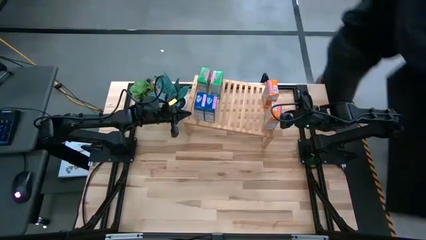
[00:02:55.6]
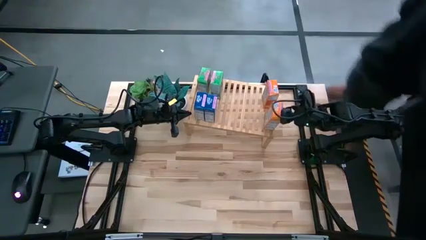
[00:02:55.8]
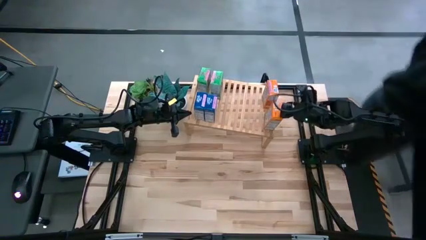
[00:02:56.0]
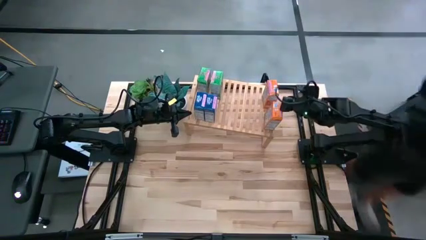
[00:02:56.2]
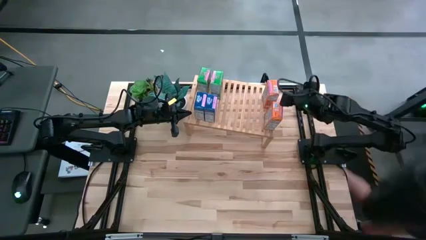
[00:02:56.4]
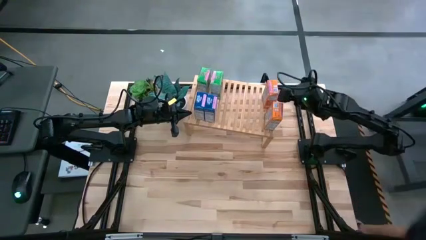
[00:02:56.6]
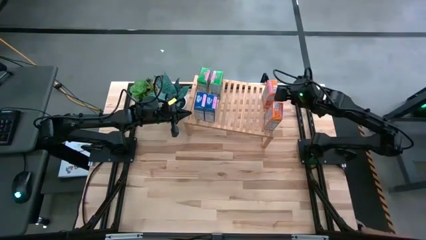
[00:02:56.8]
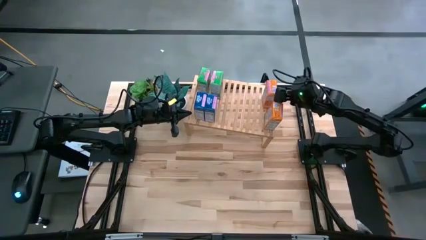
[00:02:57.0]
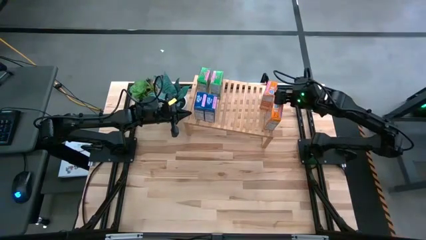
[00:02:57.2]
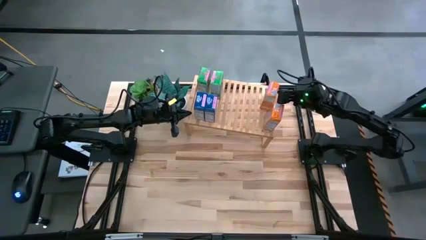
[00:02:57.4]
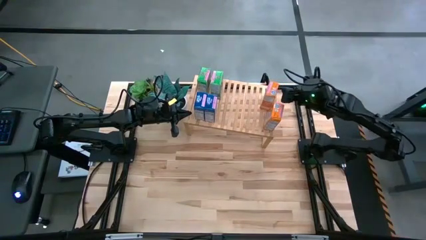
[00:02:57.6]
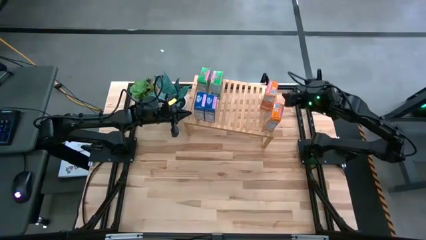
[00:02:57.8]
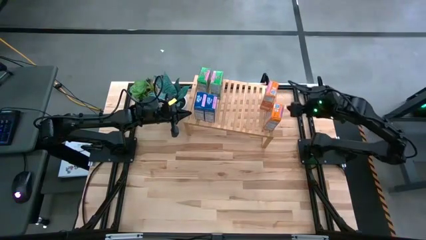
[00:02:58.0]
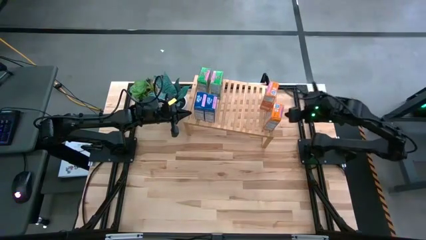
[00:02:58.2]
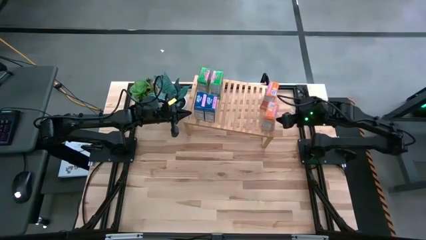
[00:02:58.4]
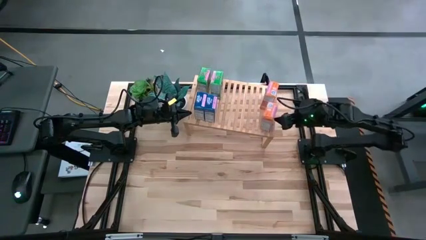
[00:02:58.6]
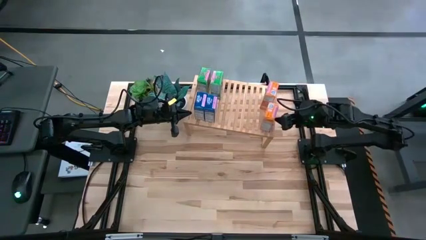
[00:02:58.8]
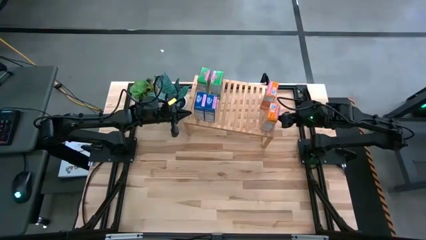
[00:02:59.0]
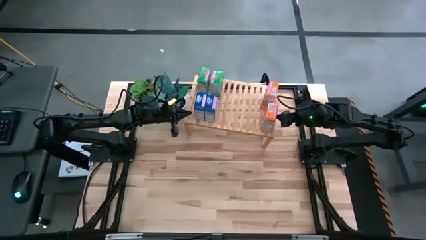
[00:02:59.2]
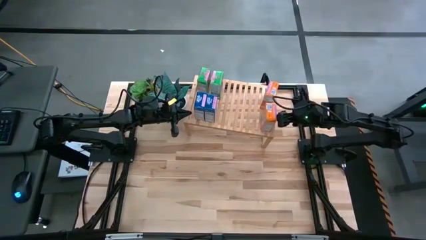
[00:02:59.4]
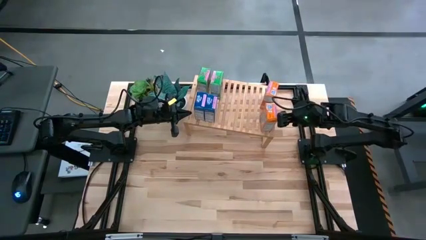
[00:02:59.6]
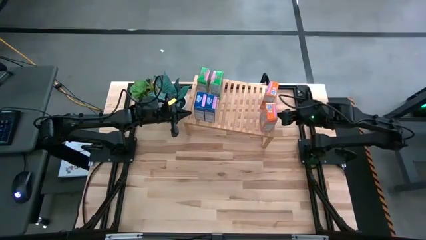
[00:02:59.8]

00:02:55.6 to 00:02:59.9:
Task: Stack cereal on shelf
Adjust the orange cereals on the shelf

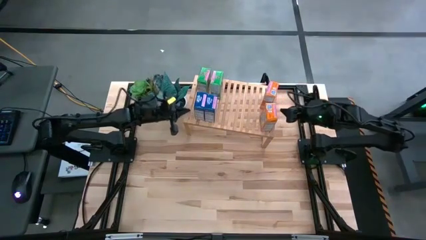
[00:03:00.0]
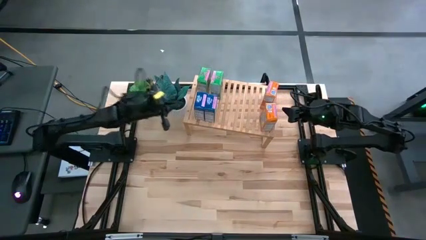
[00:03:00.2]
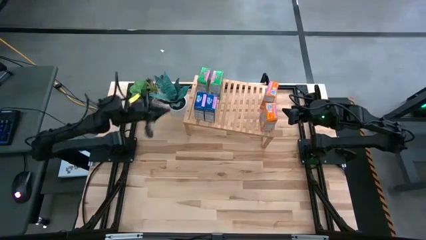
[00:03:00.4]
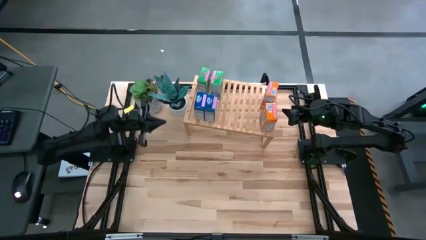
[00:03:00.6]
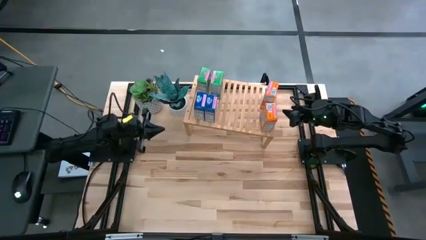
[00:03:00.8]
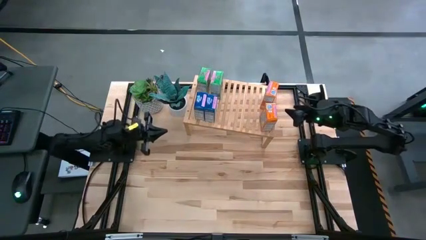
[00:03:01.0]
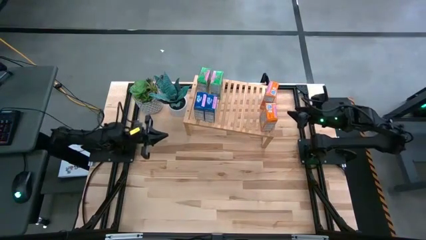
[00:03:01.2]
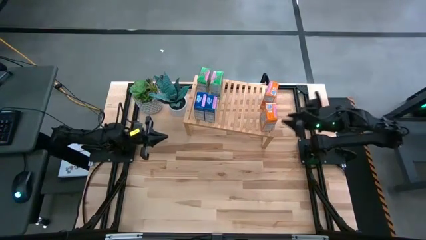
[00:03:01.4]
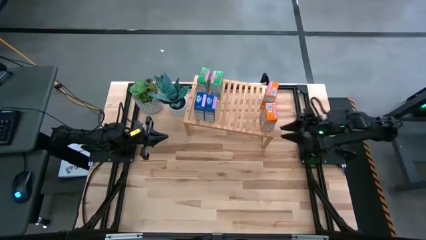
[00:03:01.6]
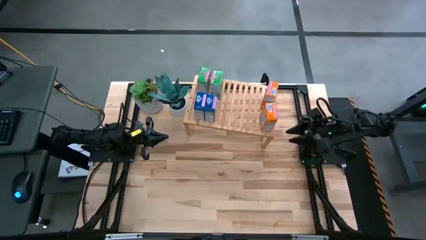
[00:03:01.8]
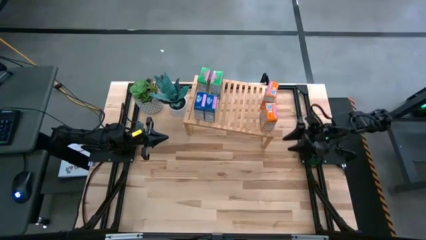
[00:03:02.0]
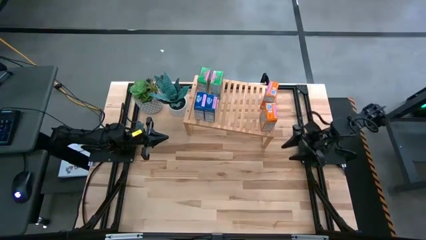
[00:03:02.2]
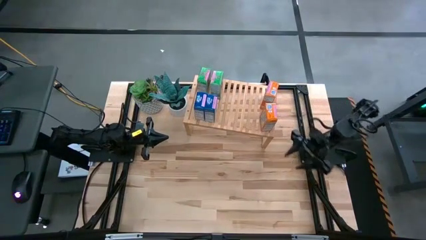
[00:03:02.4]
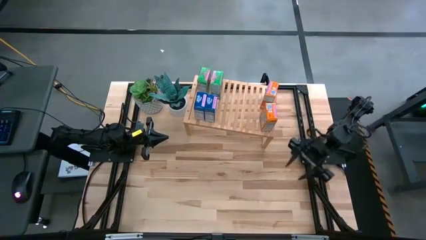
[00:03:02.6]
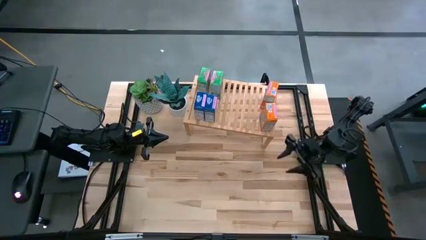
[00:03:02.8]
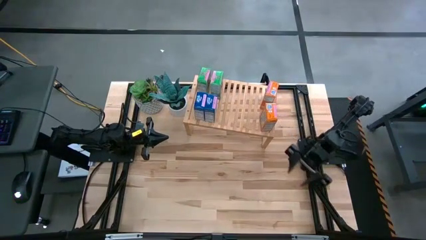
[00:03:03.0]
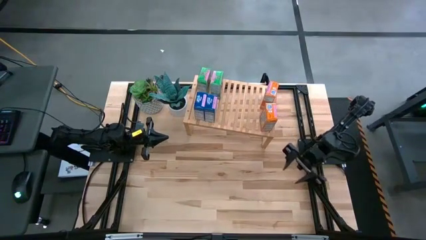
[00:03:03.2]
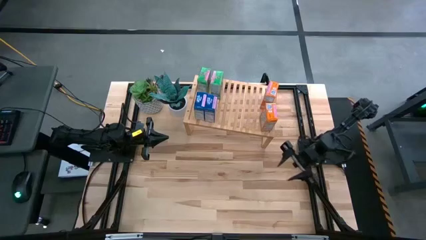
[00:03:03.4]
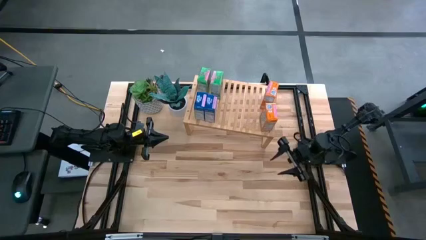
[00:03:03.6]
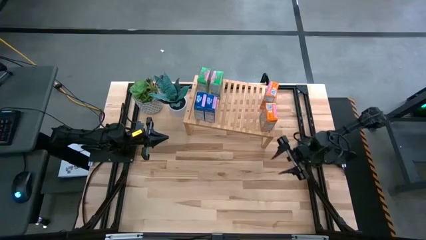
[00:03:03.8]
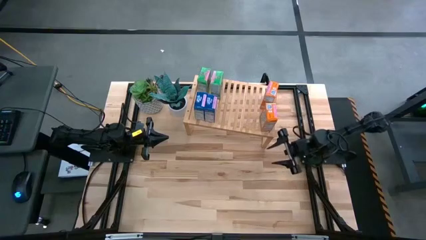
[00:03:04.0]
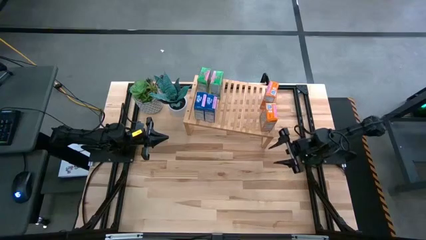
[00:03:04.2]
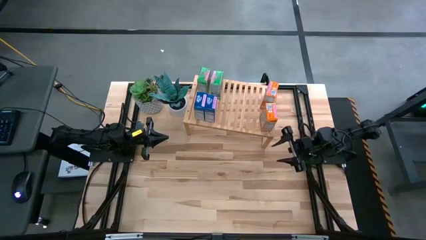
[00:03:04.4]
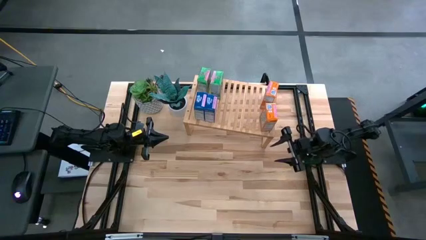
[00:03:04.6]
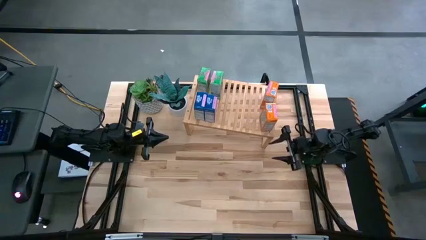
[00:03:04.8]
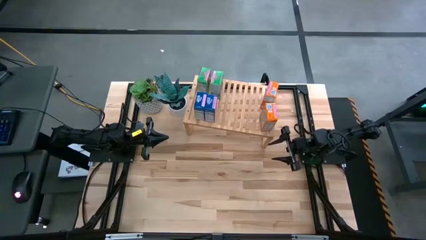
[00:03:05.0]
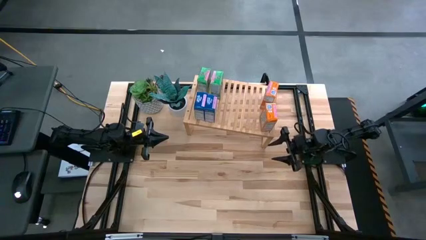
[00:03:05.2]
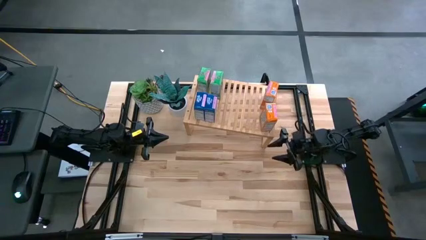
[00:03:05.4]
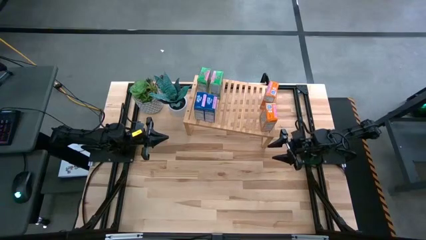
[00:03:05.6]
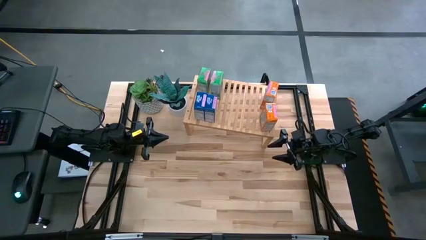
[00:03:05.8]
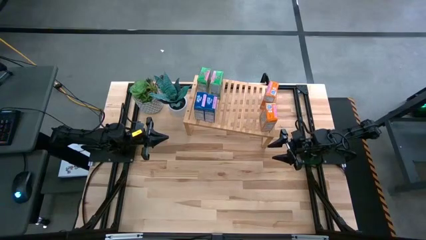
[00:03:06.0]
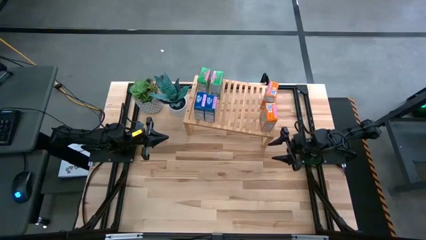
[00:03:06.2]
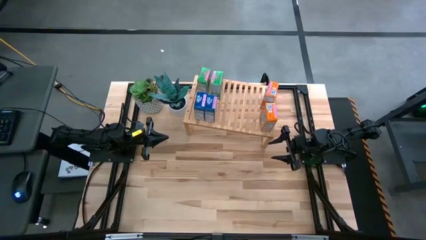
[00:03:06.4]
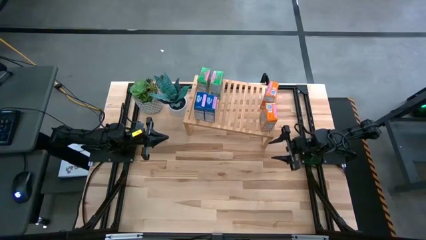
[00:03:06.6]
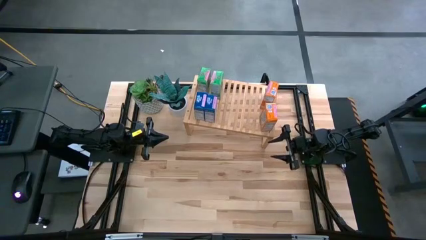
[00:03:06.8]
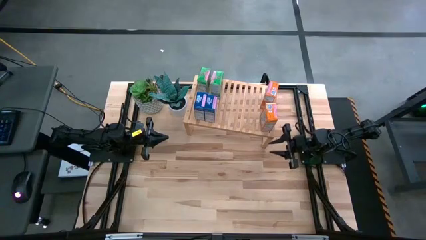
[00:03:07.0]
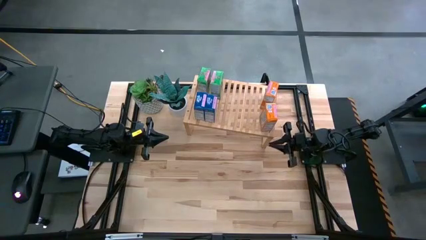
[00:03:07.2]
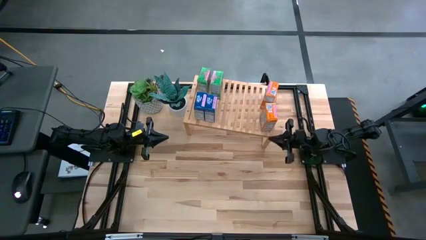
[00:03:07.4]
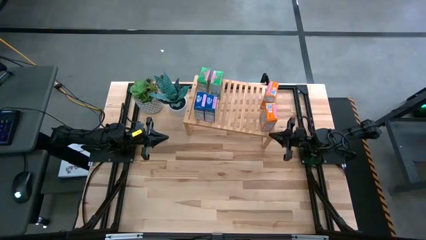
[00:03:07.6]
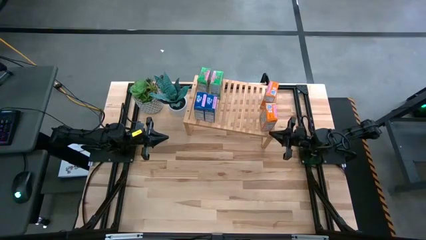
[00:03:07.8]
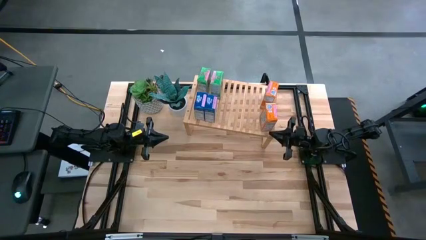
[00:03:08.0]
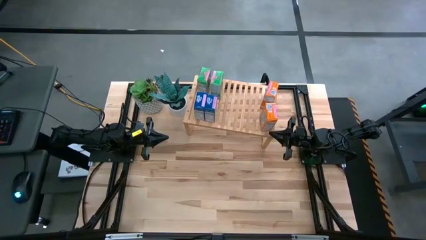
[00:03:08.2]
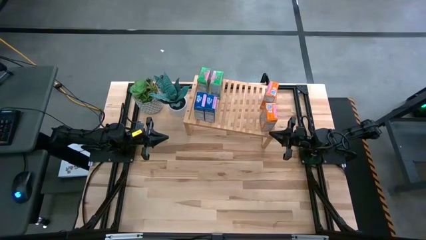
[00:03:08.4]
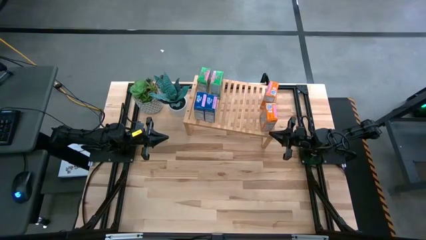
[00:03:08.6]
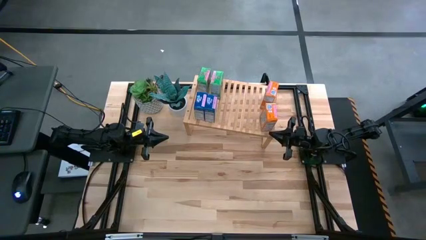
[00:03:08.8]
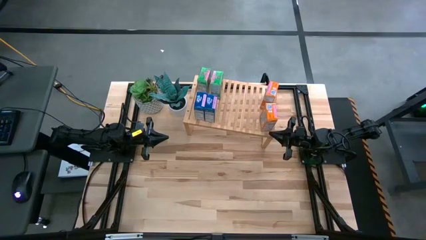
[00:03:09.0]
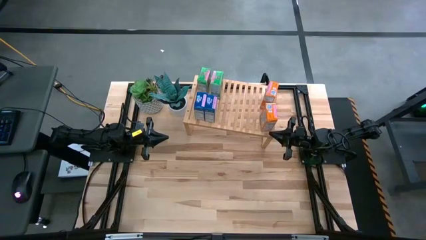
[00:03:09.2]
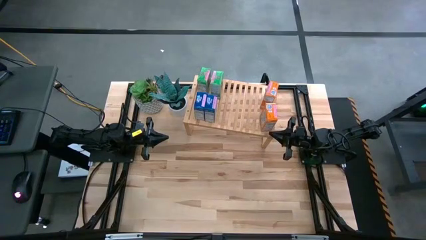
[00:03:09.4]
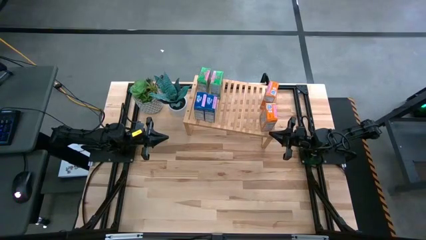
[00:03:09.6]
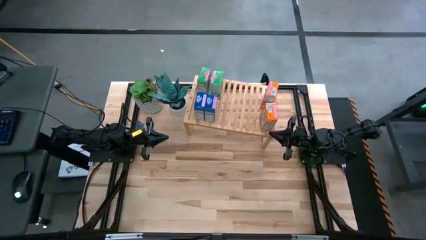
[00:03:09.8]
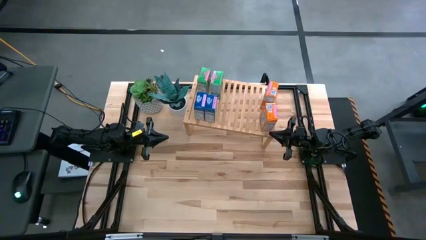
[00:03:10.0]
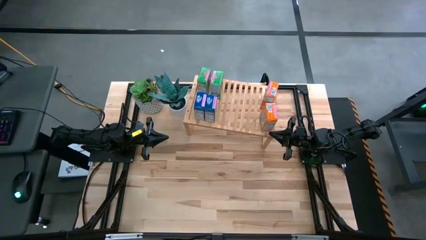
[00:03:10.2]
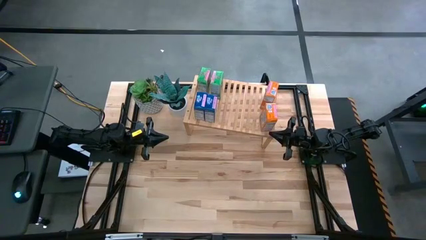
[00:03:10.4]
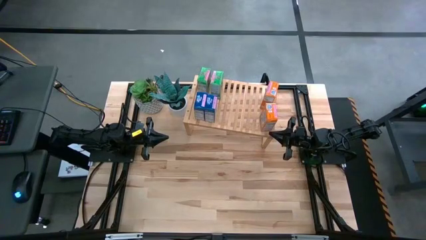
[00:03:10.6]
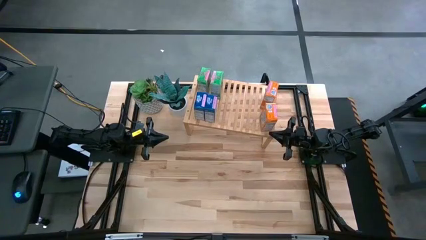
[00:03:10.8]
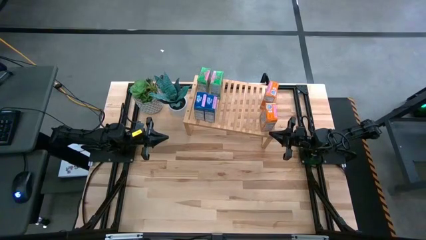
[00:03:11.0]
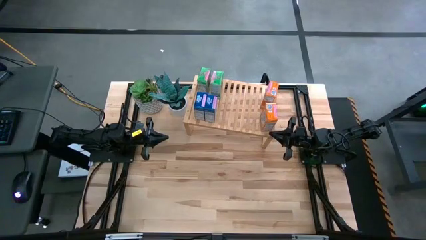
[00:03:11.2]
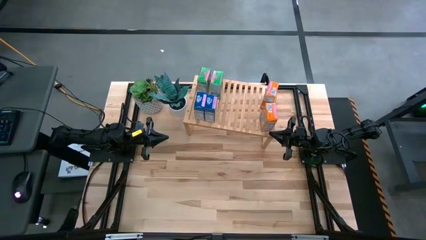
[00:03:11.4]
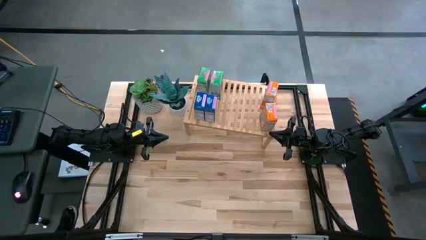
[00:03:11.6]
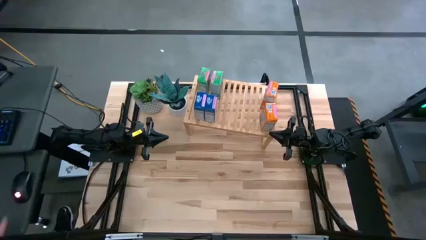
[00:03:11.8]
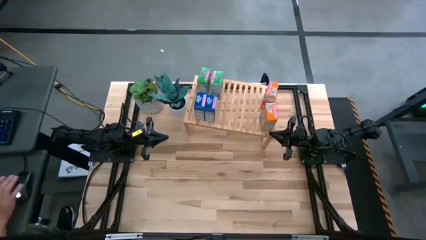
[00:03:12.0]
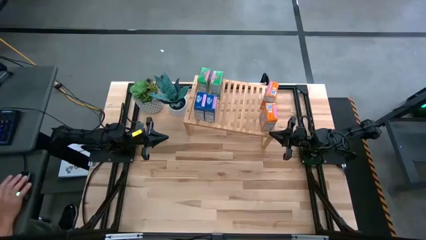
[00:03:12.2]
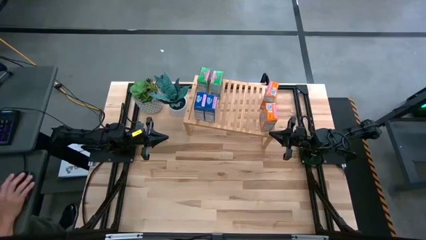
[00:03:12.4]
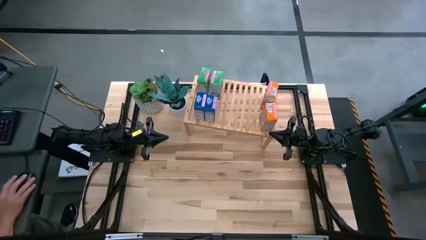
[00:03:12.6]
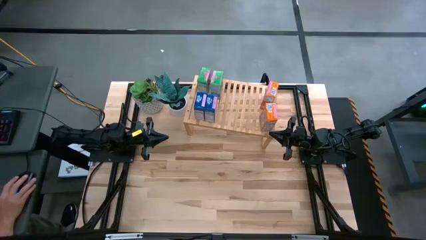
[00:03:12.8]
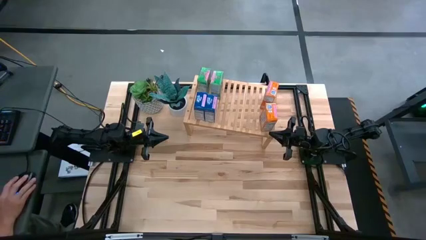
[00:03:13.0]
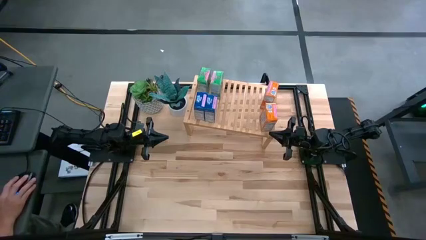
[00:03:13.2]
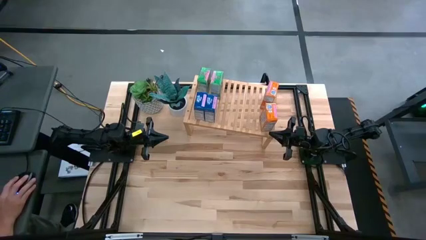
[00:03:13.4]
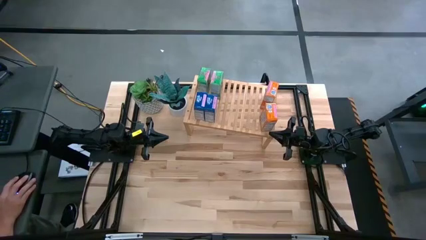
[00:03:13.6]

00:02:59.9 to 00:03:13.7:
Return to Home Position
